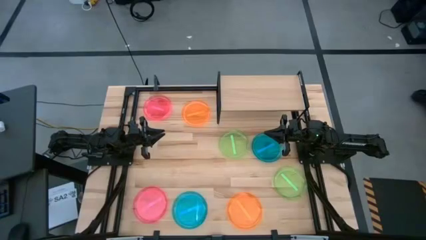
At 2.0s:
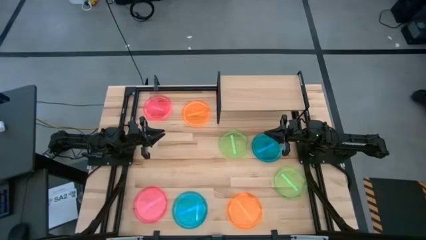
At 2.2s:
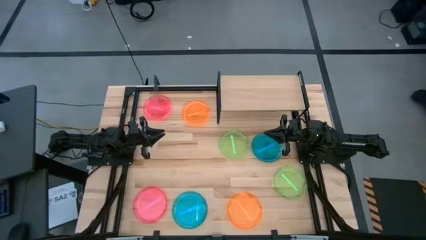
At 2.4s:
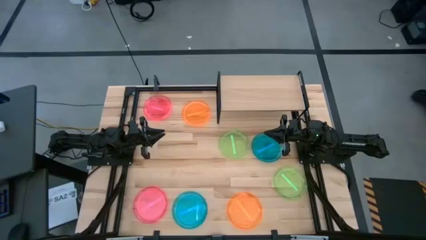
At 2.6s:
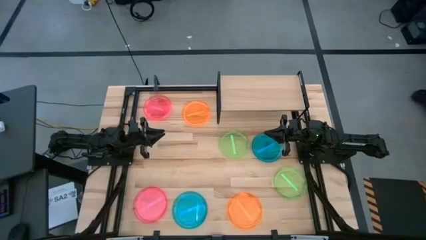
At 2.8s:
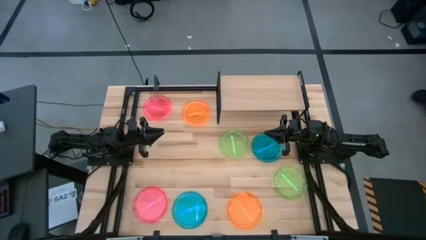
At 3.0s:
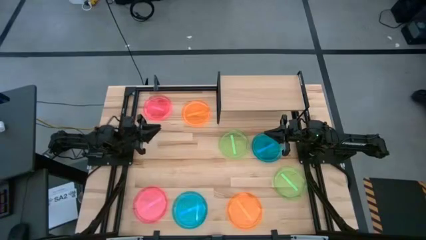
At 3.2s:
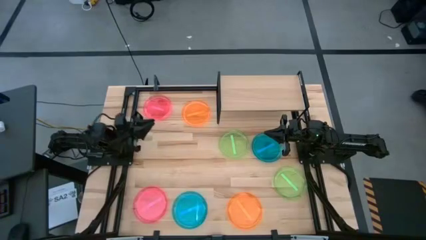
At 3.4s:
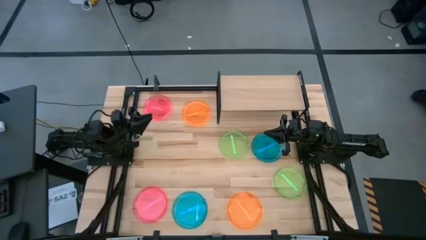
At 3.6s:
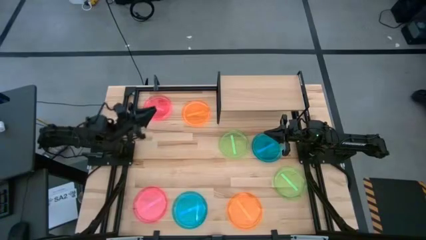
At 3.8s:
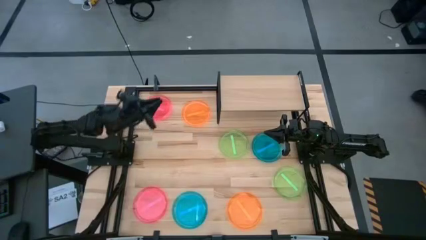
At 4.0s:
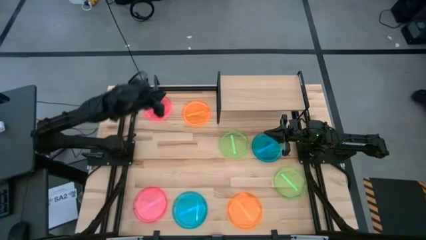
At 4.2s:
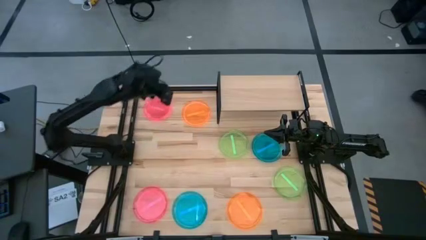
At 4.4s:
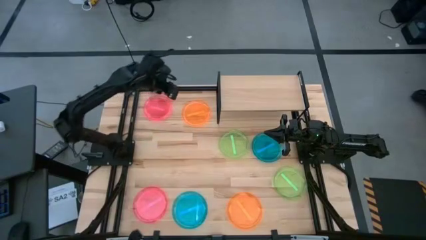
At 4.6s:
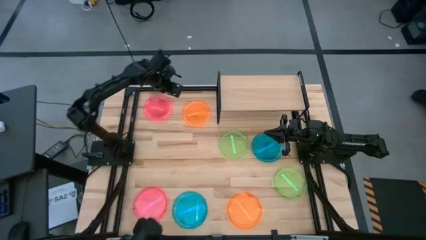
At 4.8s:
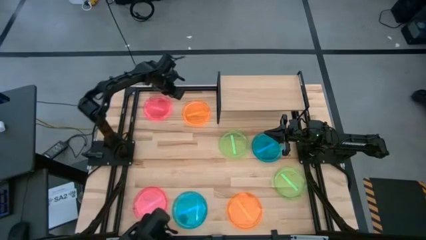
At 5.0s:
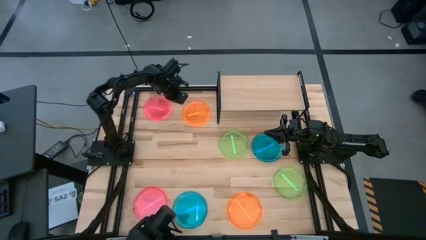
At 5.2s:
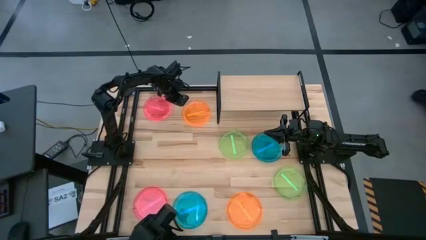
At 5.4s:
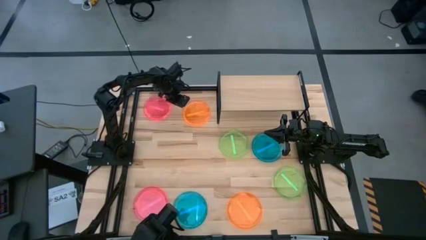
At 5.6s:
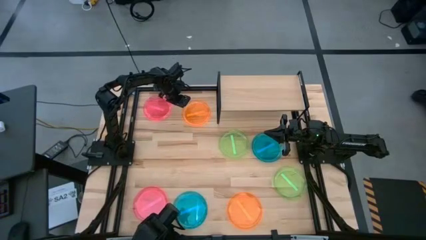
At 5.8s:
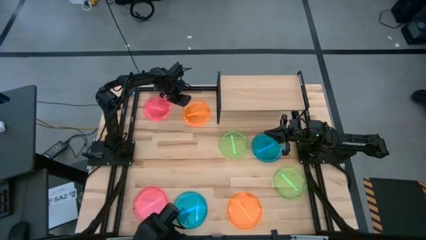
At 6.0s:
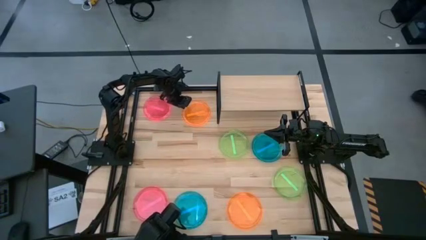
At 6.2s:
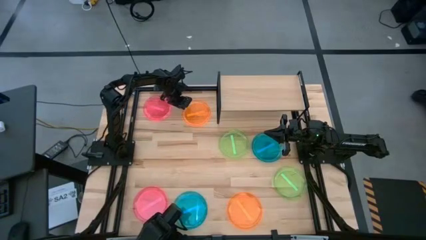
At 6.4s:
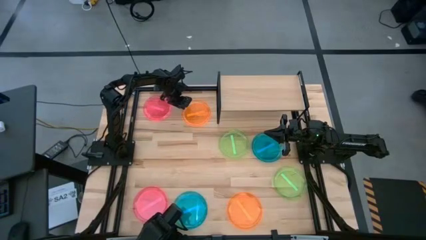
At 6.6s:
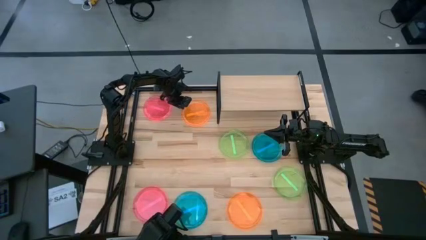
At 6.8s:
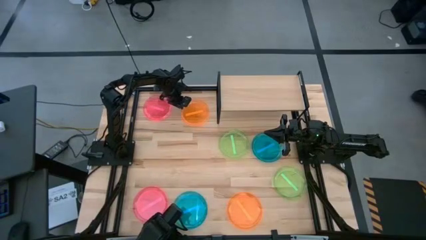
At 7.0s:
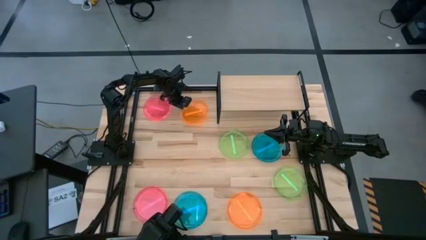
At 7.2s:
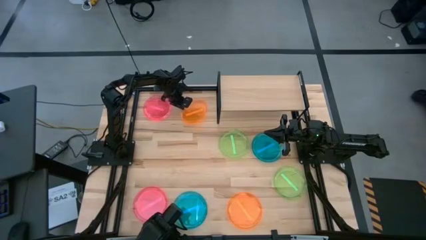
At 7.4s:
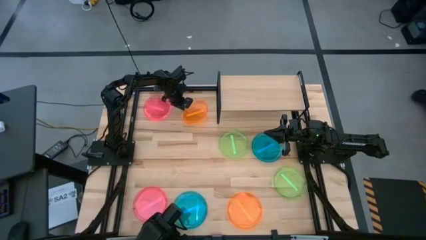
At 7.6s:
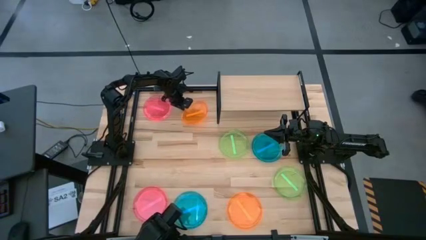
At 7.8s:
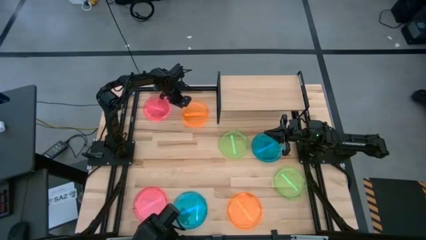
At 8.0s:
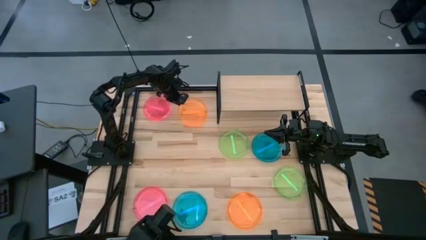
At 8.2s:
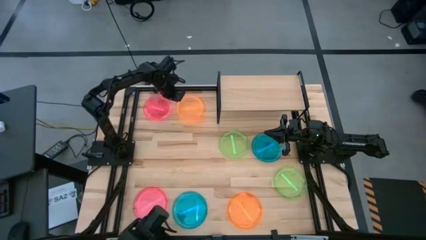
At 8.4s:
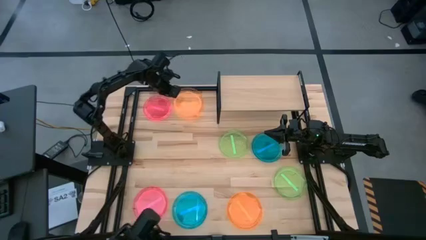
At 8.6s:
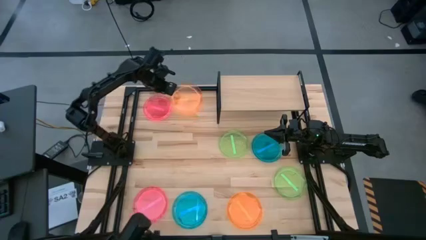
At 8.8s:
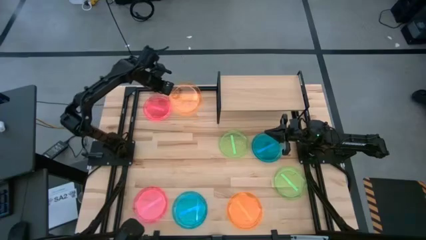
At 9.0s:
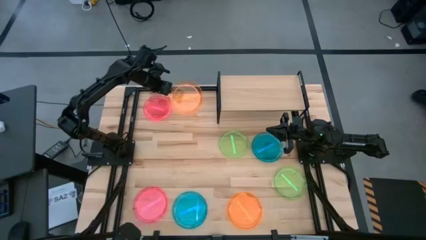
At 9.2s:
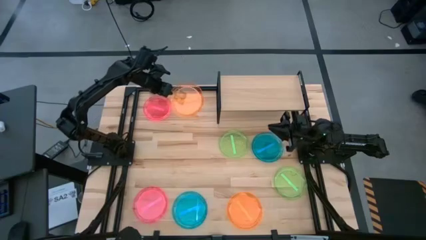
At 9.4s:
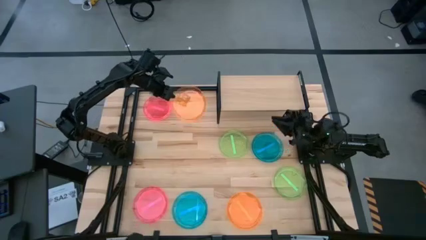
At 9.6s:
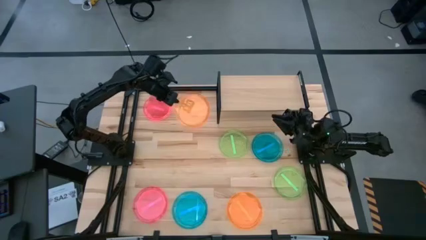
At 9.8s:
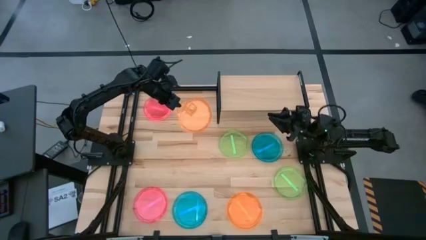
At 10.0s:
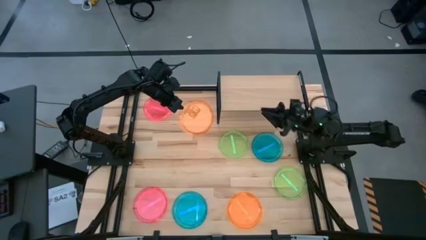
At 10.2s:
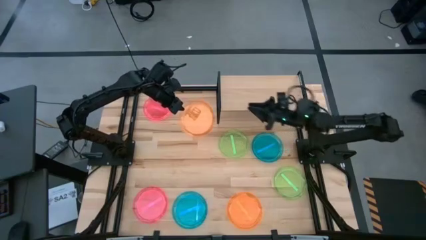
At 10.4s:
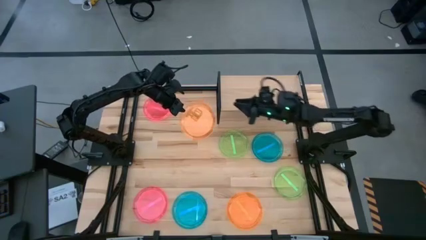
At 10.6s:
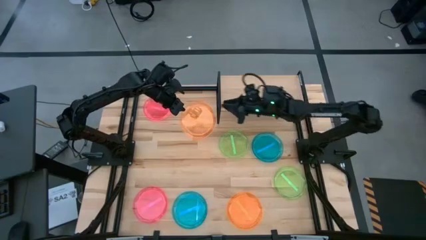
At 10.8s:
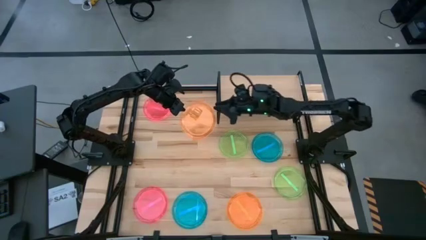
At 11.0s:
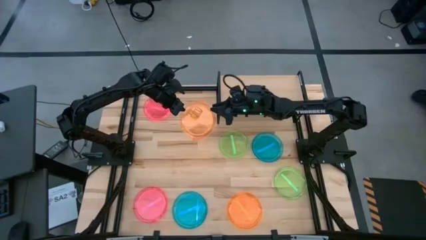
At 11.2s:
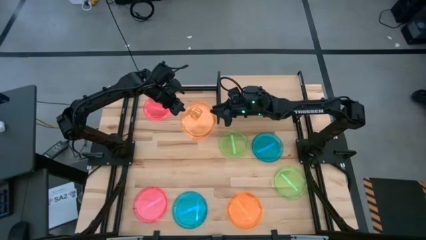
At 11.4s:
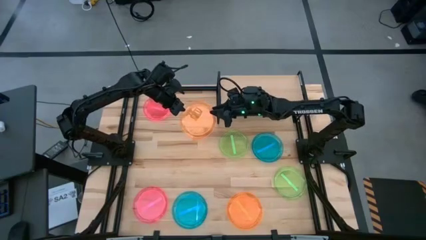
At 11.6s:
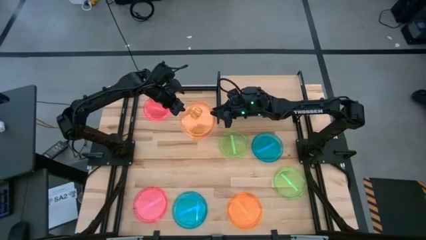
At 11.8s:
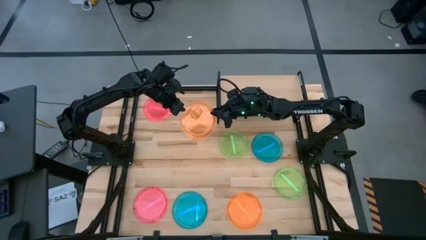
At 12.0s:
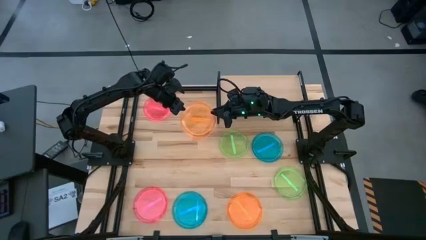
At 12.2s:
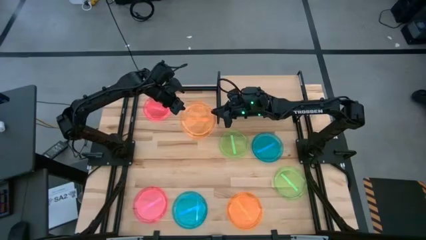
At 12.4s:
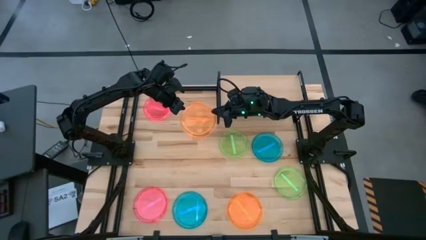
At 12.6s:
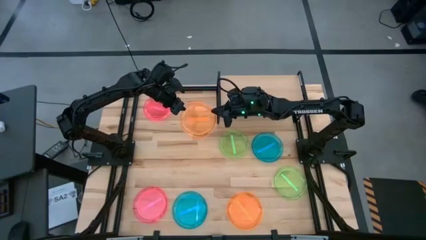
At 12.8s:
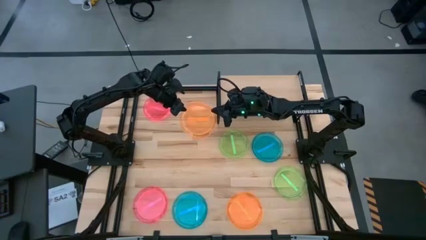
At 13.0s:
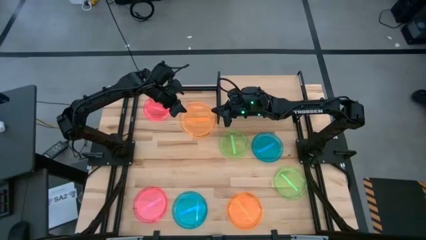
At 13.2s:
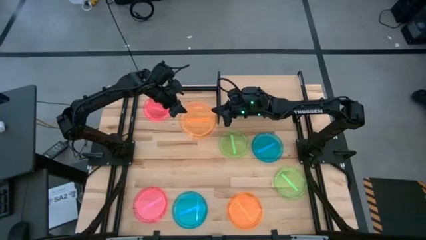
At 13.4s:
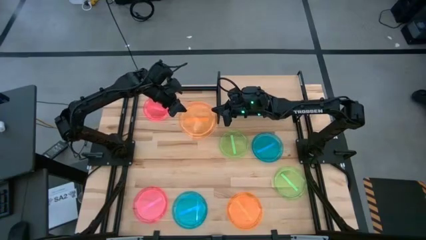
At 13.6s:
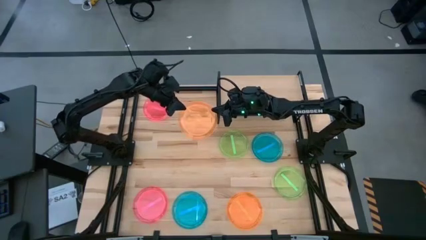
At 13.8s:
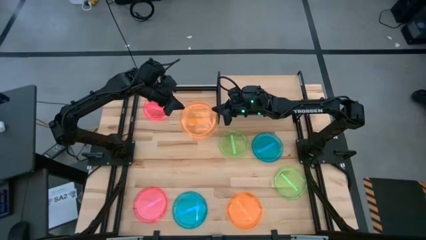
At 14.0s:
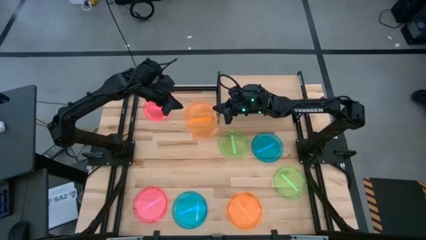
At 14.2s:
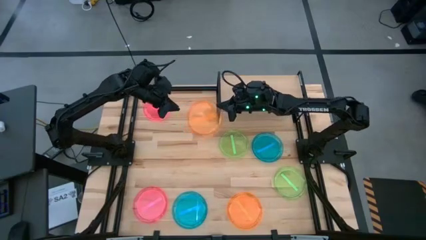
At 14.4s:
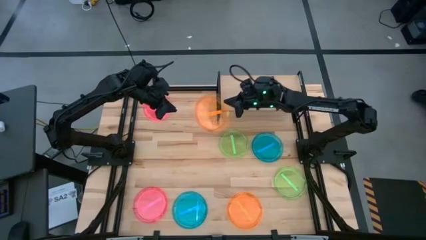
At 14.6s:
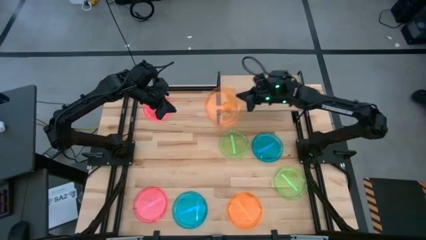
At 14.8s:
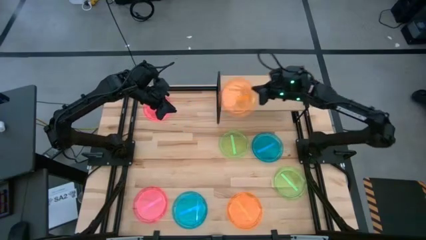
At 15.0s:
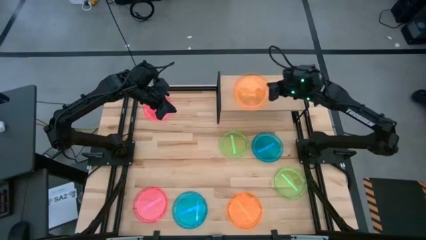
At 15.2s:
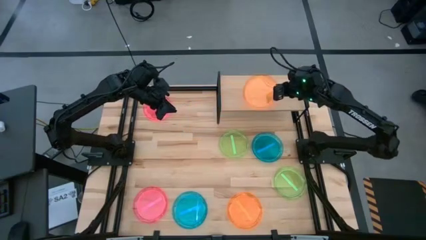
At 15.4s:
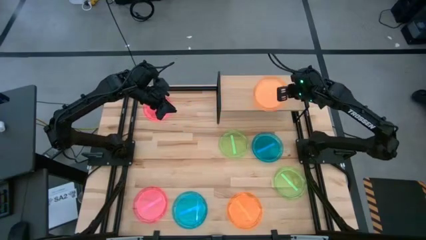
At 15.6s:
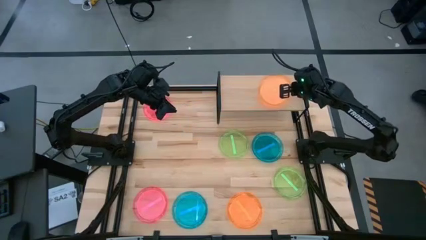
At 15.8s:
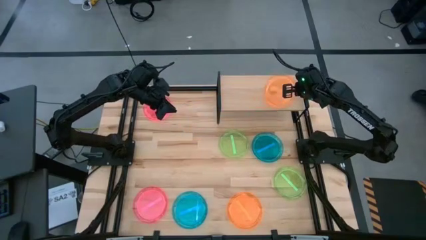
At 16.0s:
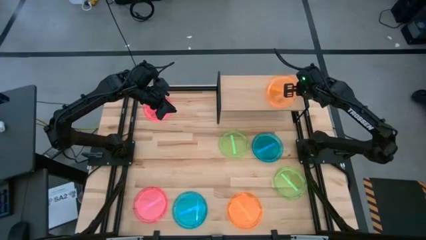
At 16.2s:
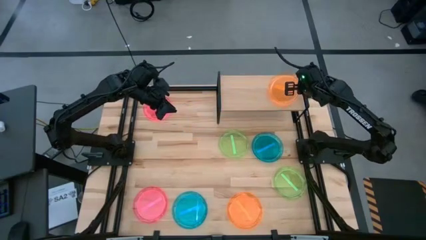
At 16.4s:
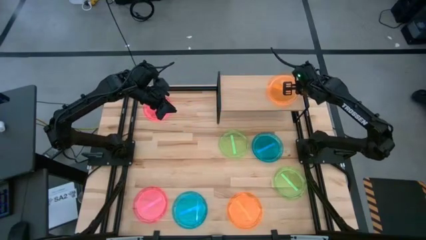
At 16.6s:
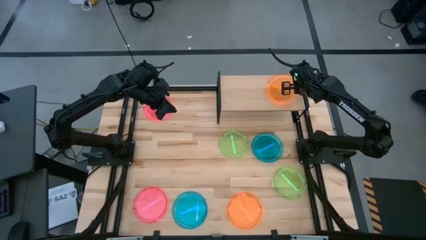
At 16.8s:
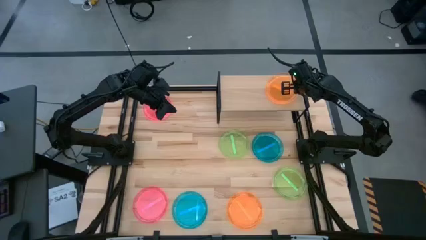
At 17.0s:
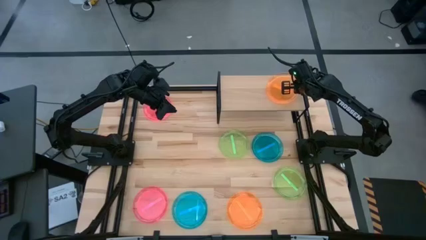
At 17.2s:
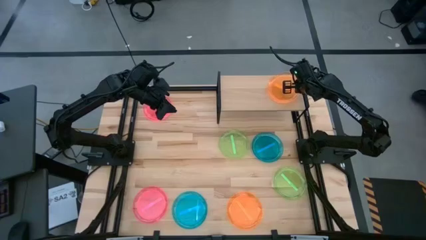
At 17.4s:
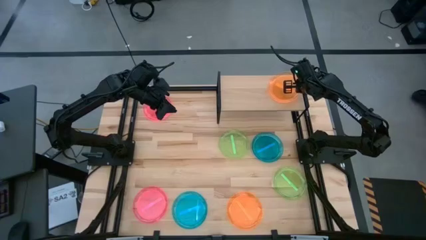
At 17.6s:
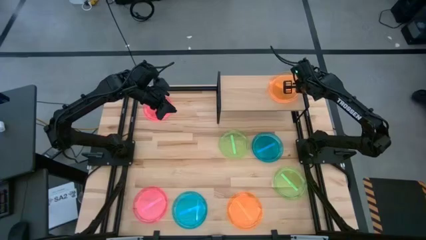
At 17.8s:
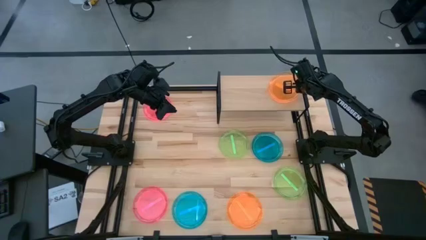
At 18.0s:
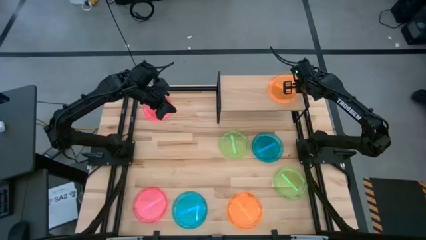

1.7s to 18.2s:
Task: Place and stack plates onto a shelf
Put the top orange plate on the shelf
